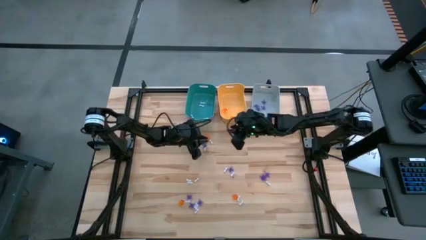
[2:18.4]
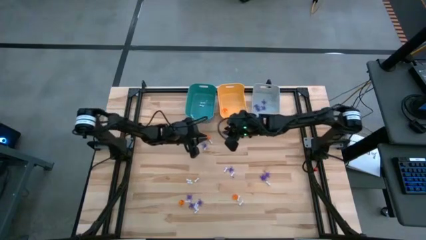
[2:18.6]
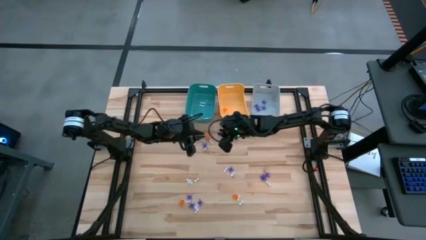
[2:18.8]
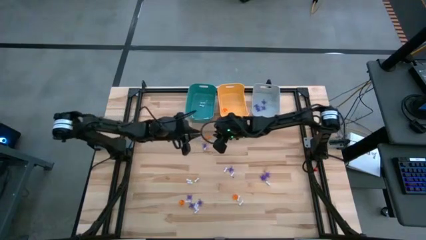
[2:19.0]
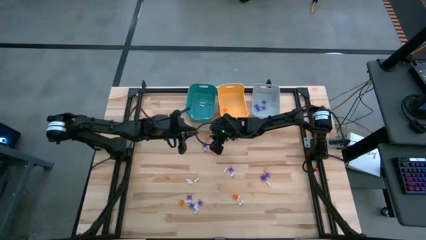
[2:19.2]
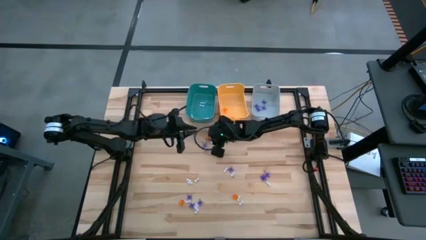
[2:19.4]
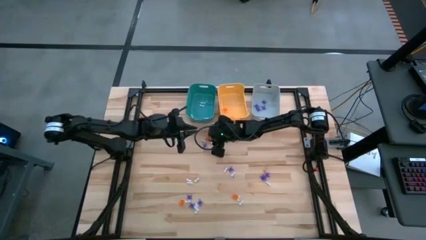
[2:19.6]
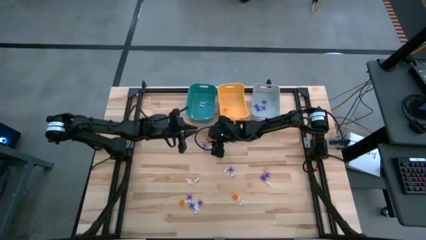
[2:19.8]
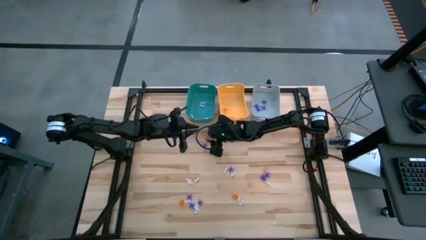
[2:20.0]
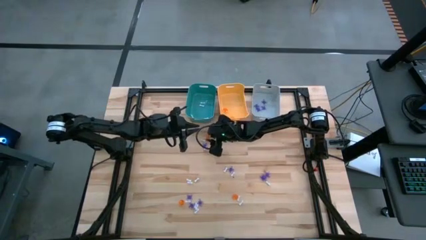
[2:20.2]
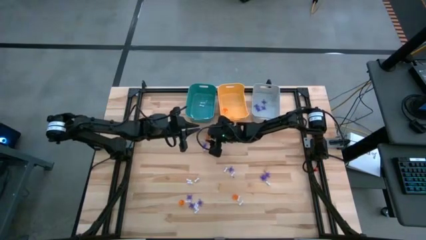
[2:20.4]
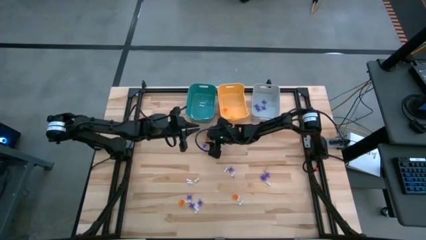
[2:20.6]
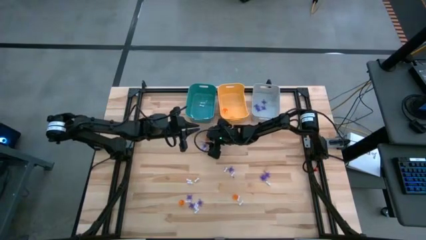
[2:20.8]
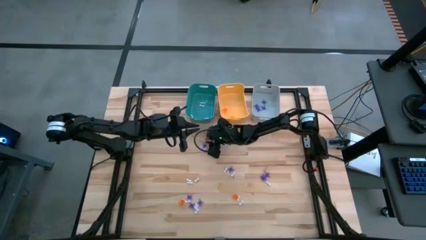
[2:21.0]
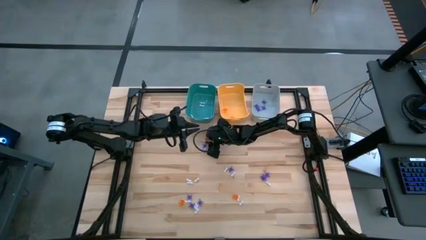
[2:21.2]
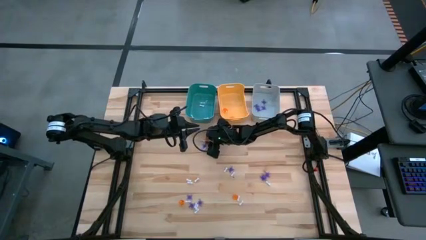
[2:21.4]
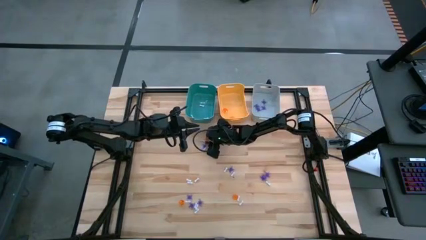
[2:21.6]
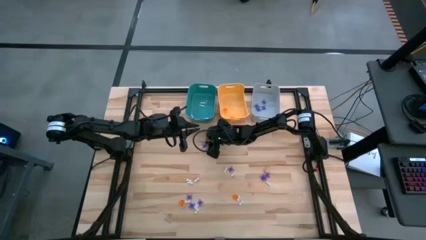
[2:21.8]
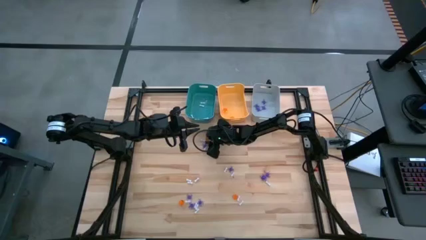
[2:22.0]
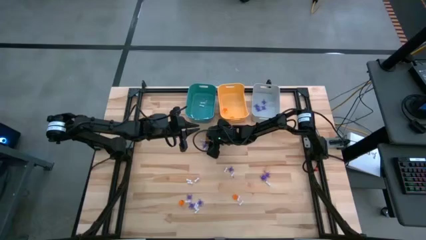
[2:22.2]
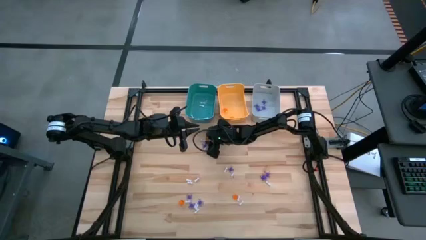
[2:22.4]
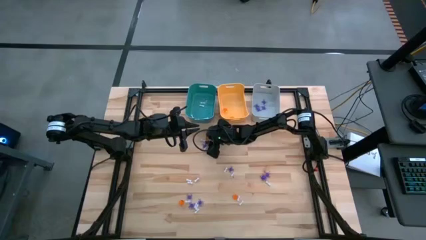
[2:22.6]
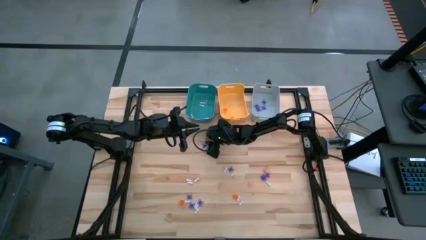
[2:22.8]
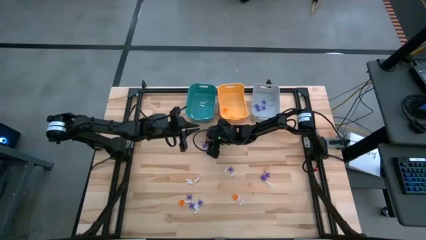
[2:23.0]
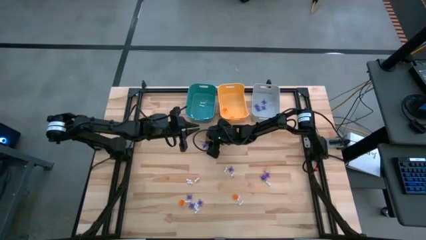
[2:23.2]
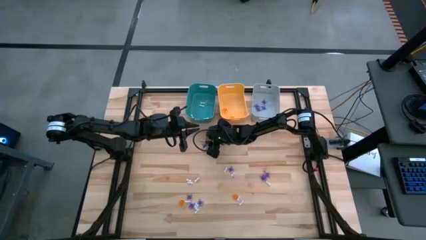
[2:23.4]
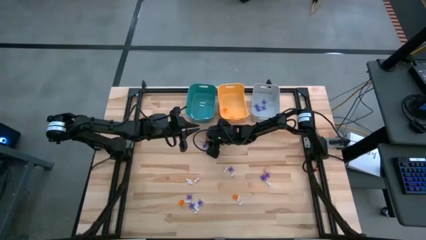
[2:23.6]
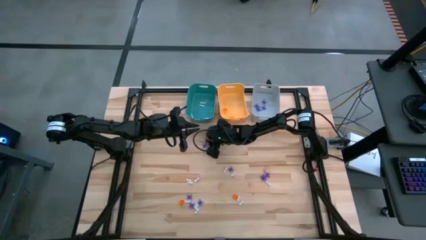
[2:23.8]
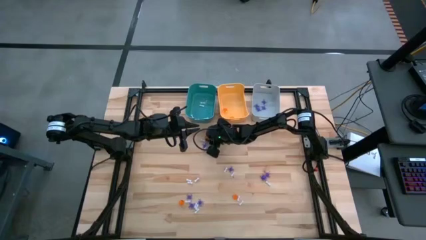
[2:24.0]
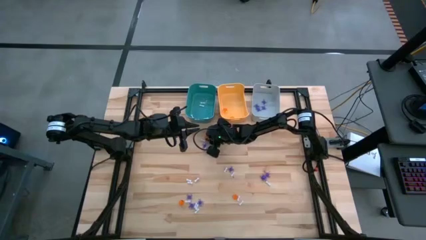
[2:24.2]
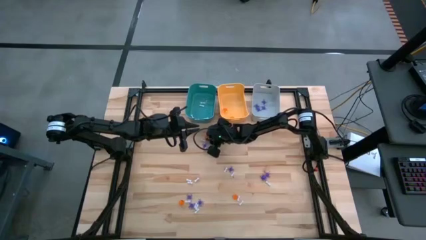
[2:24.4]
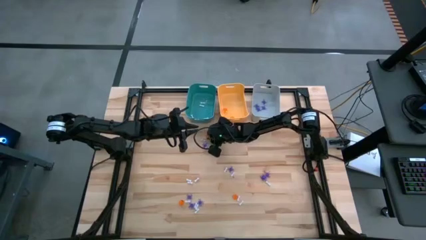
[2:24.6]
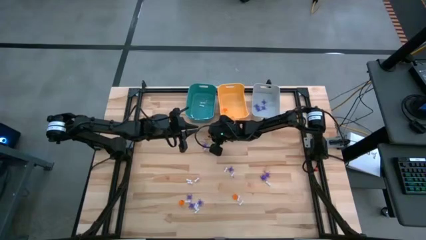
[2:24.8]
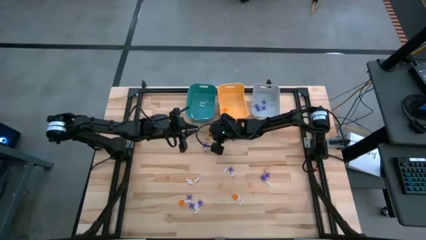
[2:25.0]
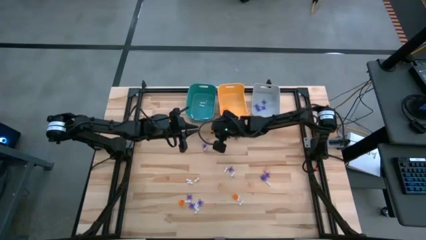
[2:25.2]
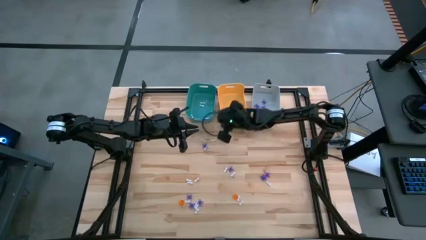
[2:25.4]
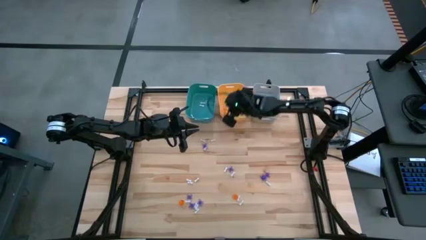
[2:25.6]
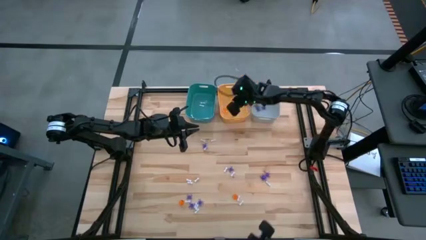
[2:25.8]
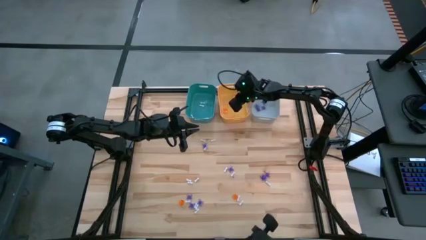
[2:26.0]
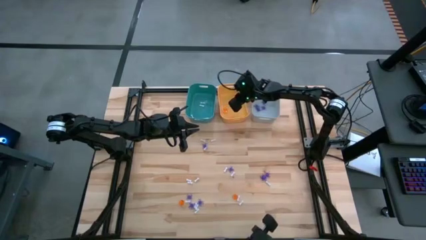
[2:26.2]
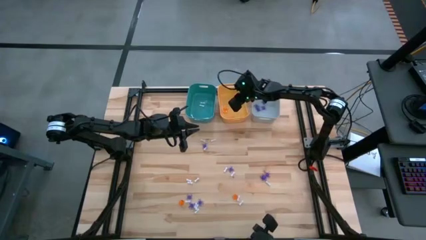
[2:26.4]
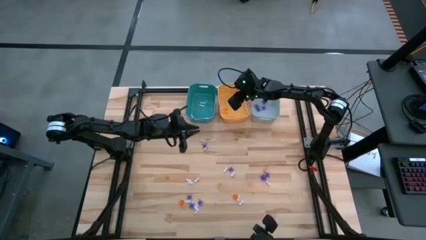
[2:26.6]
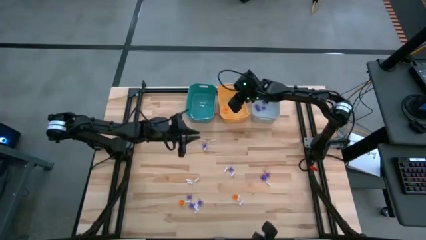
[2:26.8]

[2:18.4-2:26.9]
Task: Sort Halloween decoration
Put the orange pumpkin toy into the yellow bin

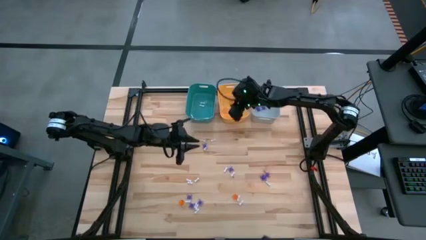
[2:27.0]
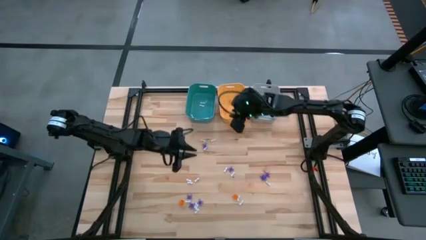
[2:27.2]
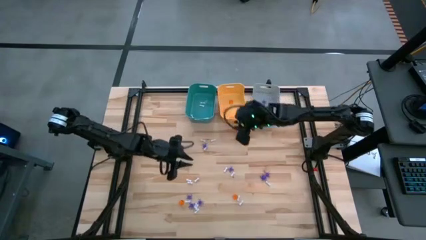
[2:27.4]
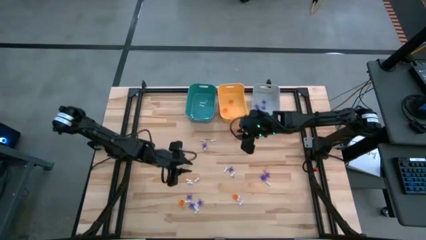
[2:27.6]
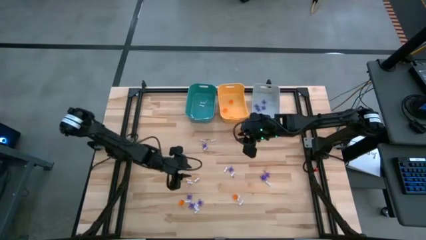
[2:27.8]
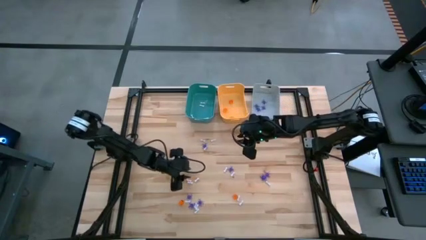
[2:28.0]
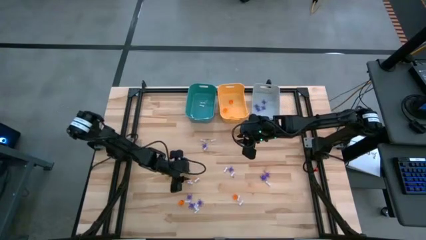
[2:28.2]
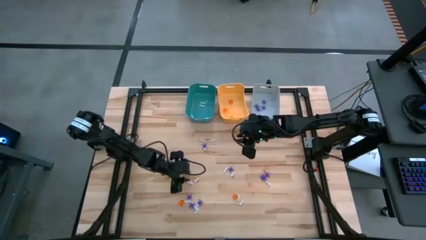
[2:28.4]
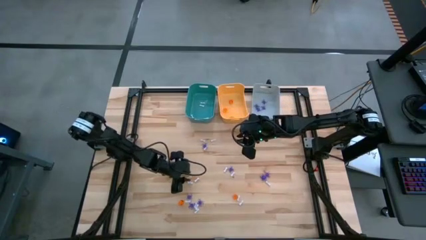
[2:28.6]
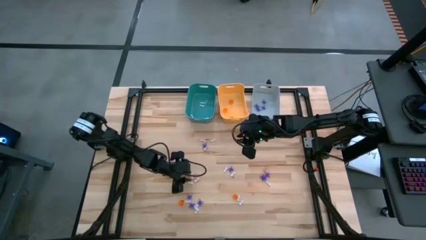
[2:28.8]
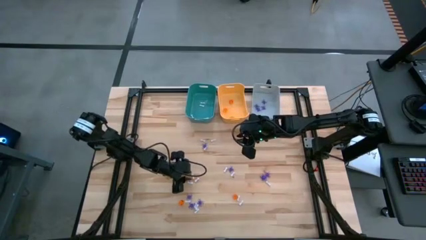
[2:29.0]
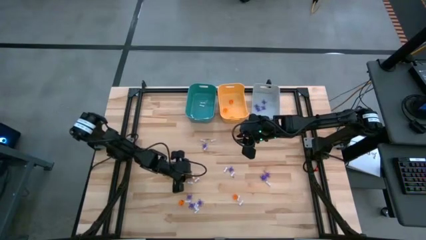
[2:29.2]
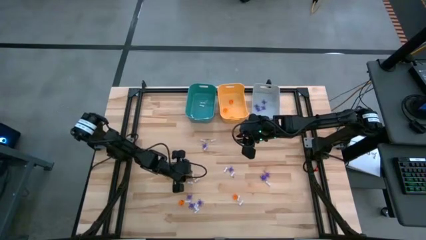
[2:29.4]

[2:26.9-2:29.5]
Put the white bone toy into the blue bin

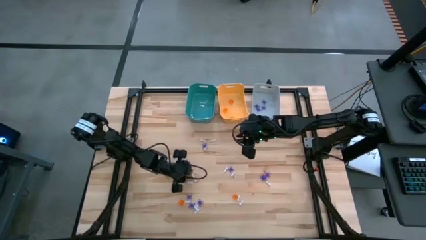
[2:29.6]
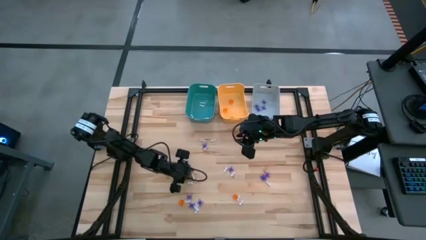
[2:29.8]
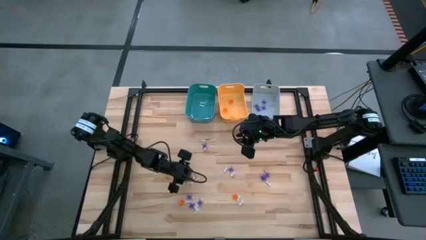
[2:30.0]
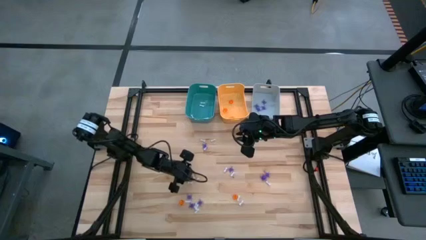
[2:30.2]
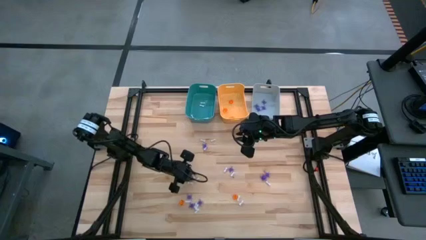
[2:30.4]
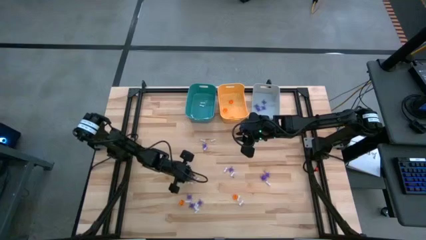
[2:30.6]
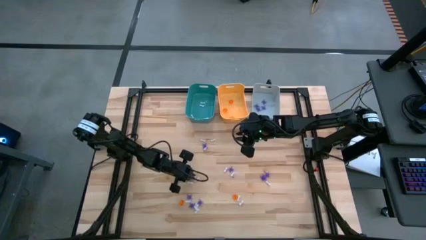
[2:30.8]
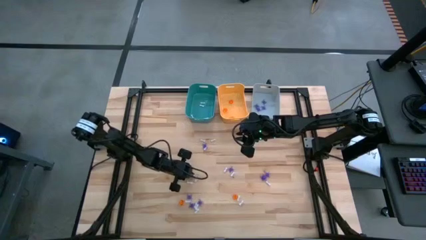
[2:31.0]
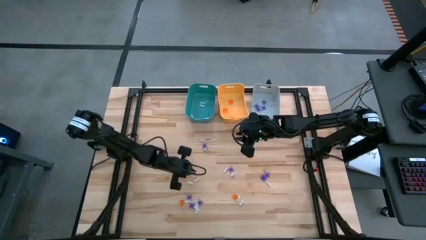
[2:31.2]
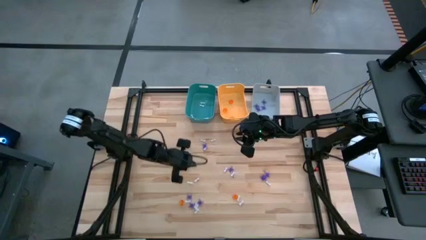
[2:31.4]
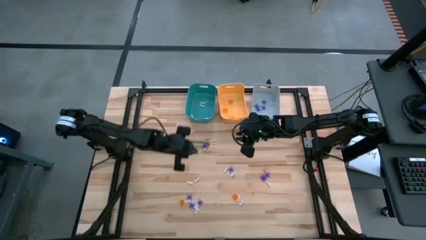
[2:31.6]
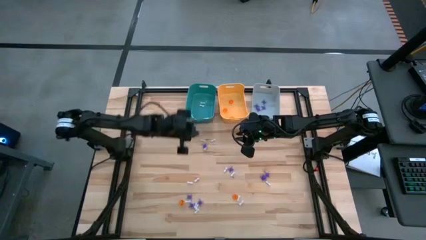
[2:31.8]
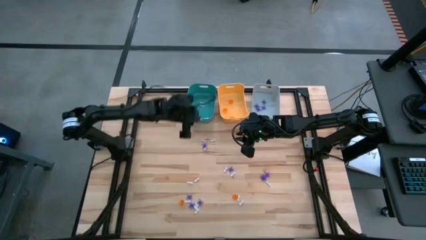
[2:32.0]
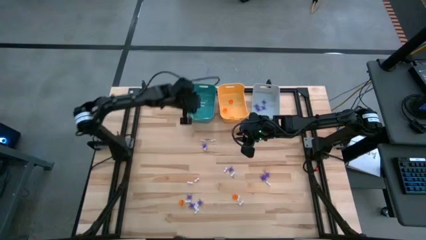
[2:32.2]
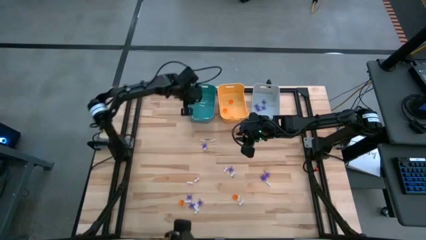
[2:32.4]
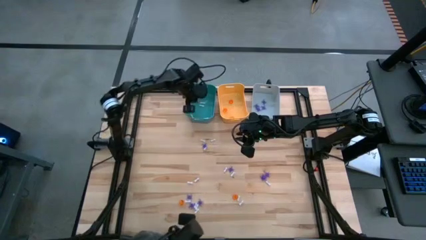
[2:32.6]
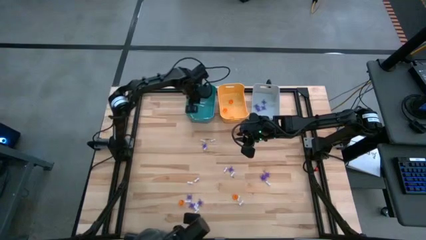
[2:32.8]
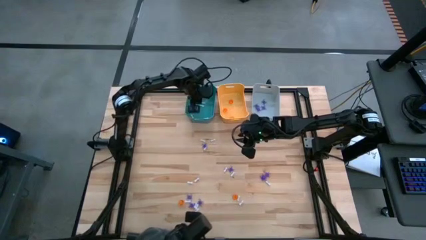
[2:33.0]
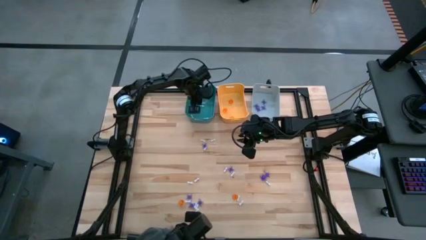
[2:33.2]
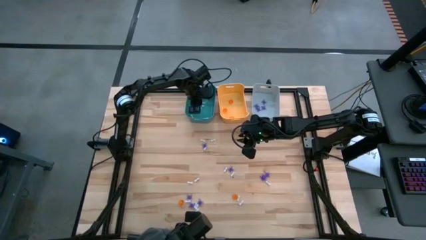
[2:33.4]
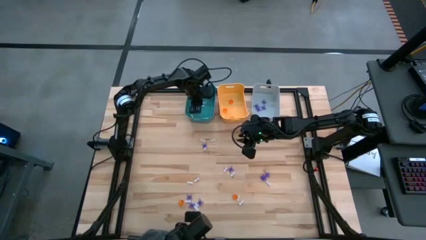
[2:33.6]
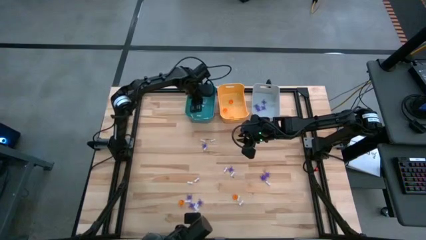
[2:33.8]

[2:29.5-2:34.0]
Put the white bone toy into the blue bin
